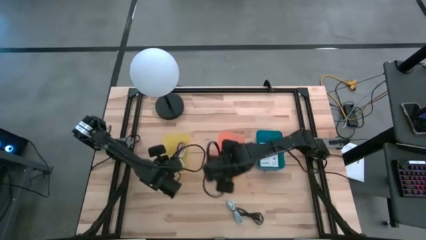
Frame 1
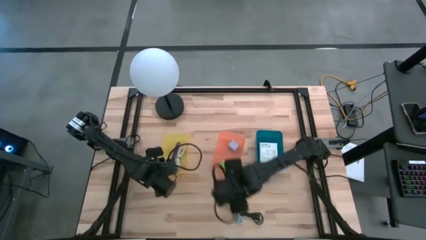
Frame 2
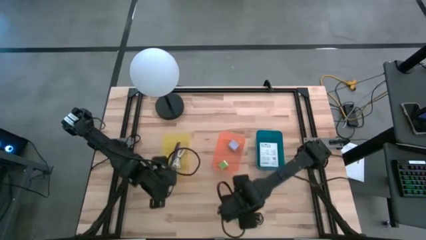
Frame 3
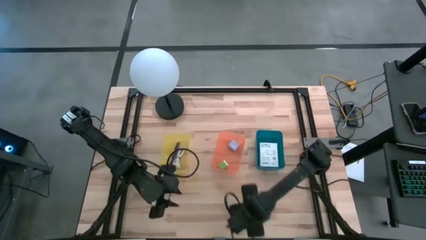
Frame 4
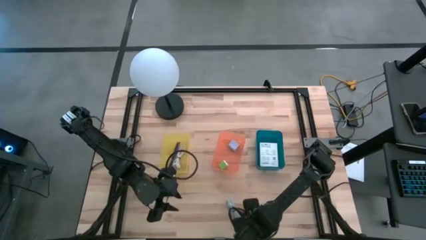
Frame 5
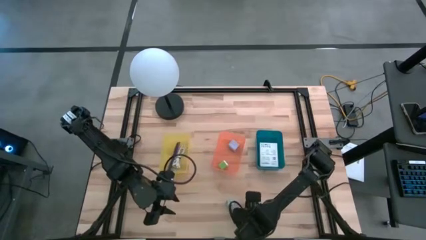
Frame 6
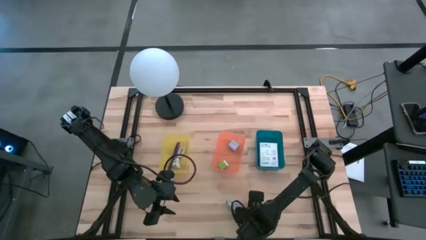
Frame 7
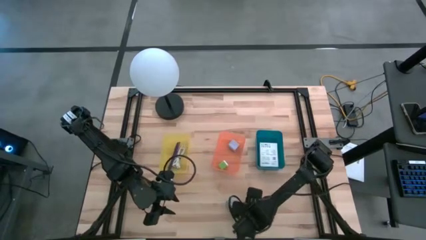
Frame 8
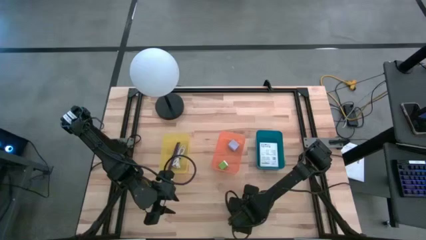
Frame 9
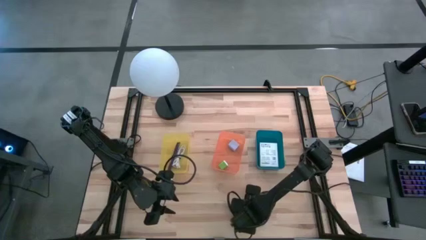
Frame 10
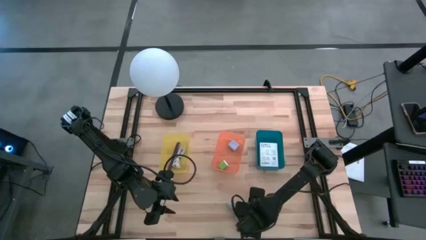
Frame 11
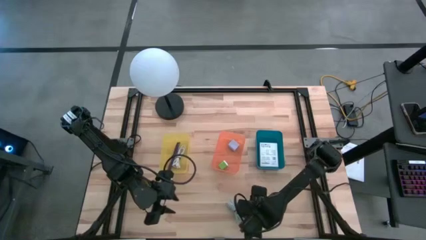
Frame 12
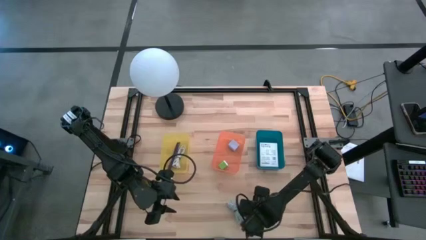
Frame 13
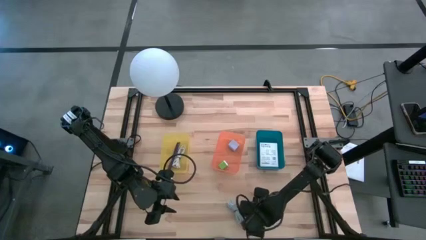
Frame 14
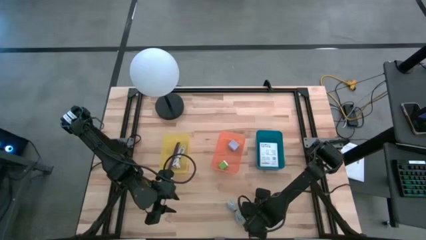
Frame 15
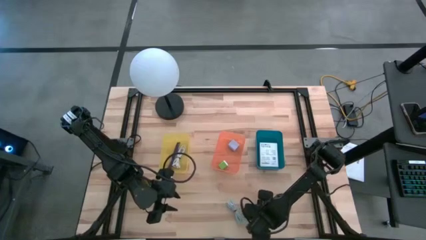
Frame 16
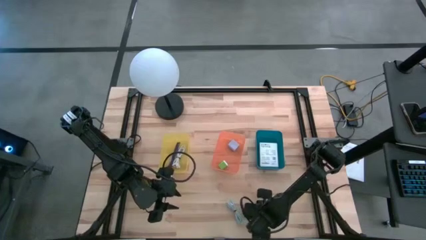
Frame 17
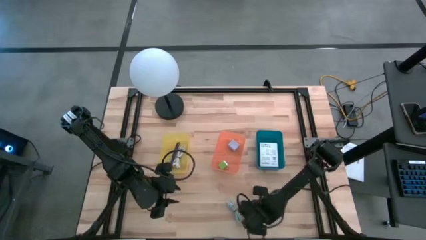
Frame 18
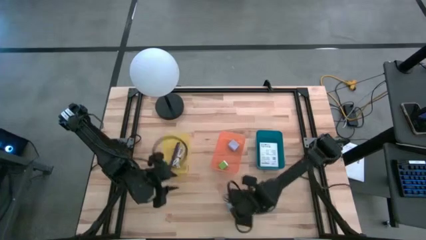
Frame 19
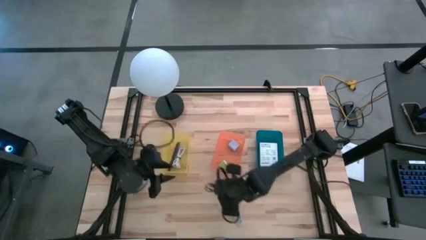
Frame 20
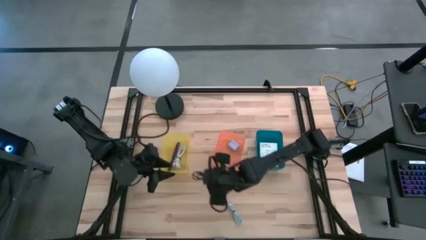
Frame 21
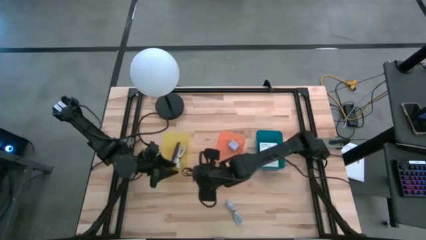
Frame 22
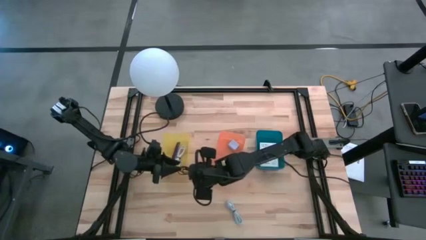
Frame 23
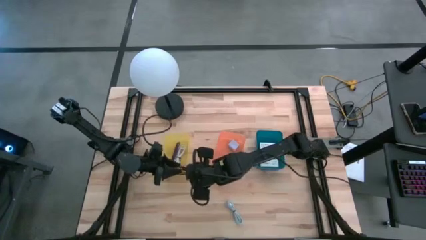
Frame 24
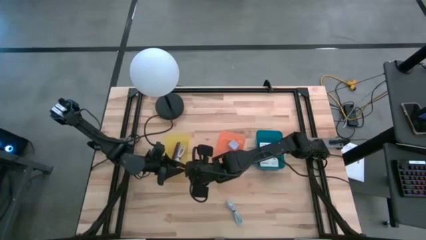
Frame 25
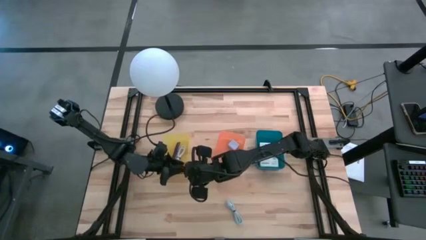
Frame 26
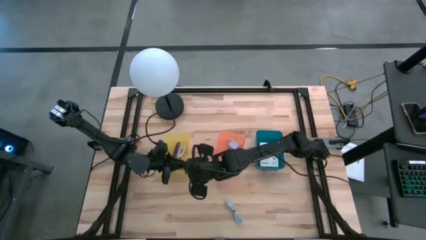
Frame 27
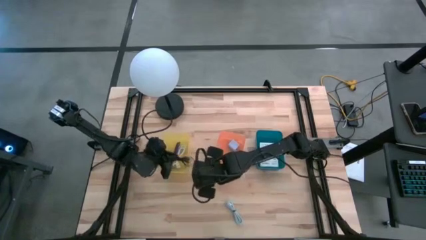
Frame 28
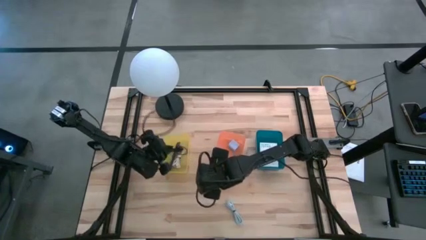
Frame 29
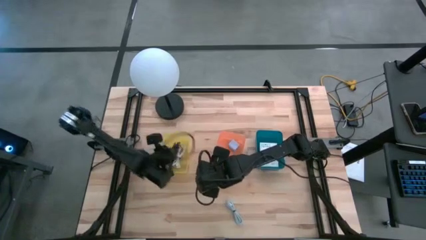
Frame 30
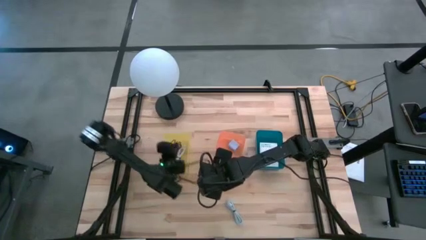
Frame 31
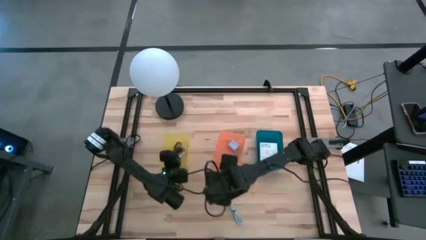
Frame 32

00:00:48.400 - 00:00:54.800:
Task: Pick and place items into bin
Put the black charger cable into the yellow bin

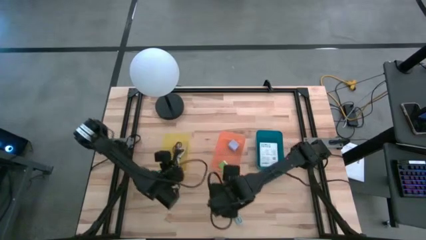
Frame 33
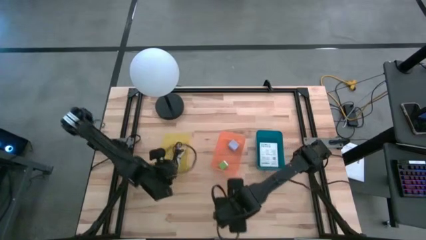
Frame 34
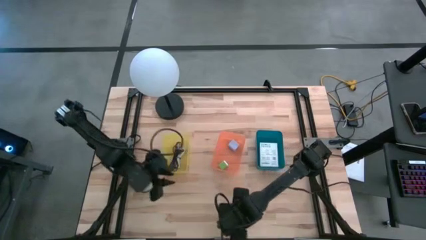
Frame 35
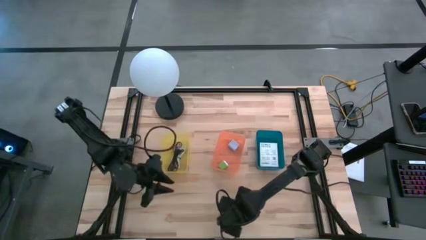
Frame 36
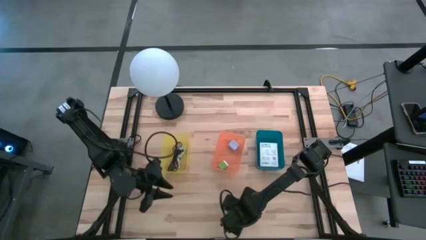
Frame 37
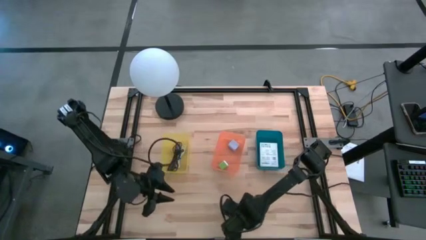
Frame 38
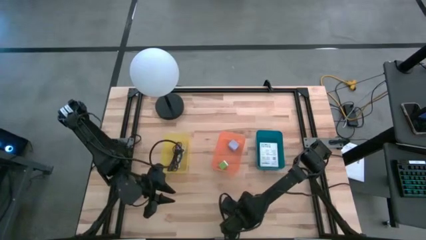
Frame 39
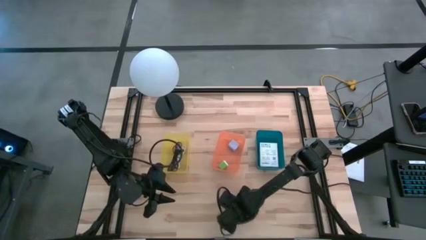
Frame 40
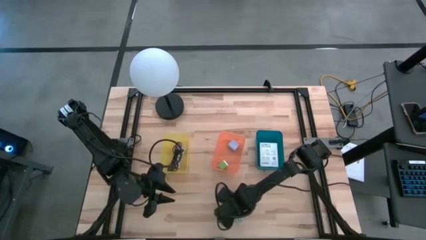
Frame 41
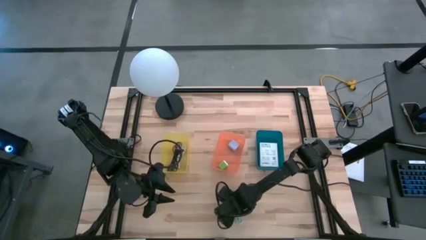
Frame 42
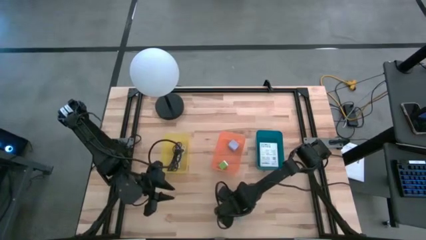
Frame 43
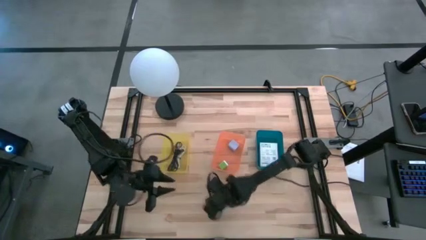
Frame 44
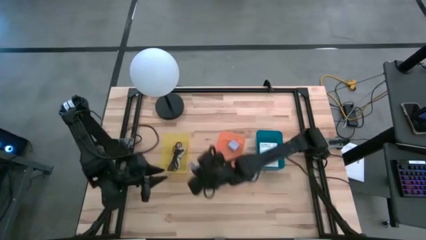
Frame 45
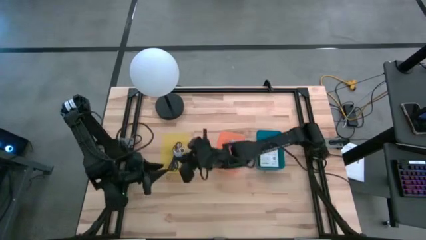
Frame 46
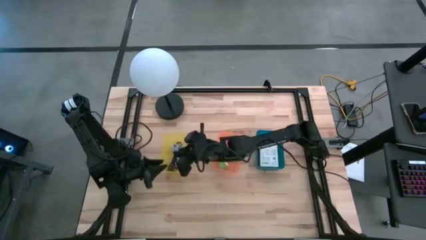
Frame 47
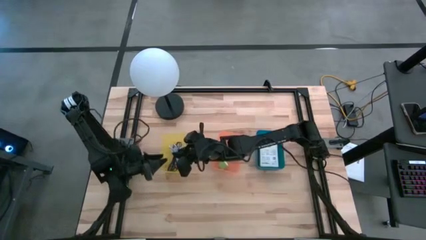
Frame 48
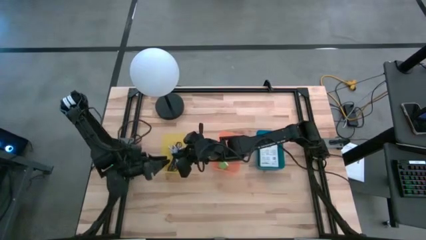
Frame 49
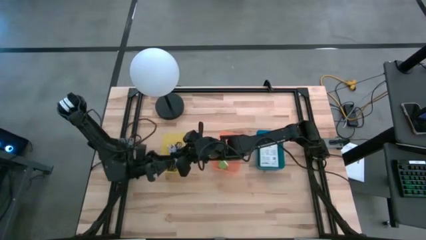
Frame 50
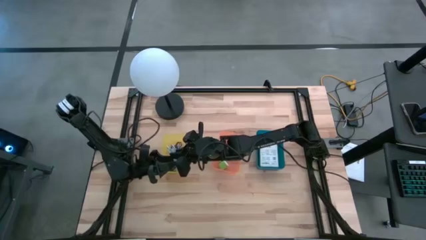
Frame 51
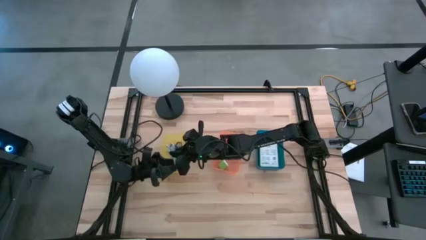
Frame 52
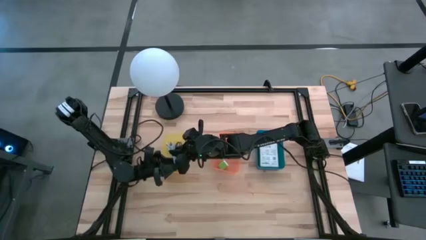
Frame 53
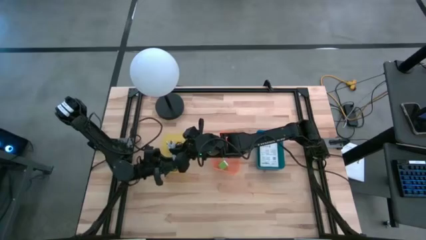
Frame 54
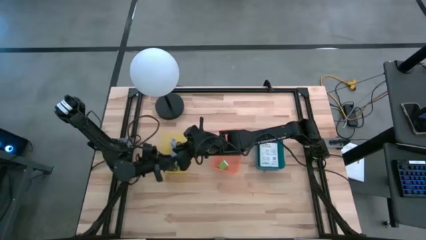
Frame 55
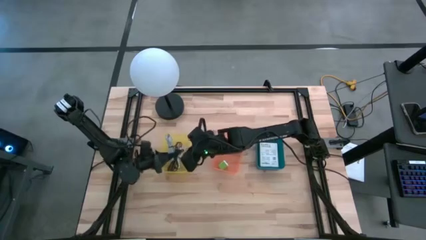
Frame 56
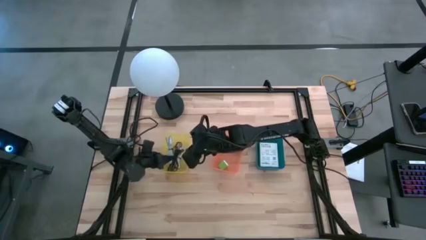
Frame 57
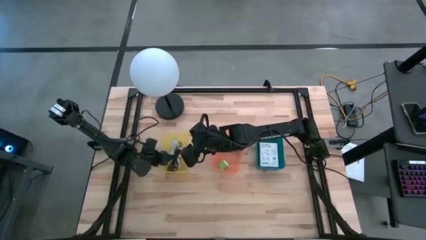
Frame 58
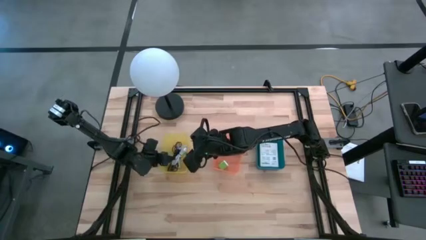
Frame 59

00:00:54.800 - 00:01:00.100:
Put the blue charger cable into the yellow bin

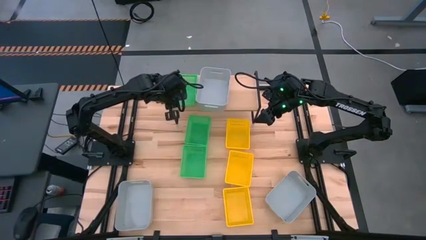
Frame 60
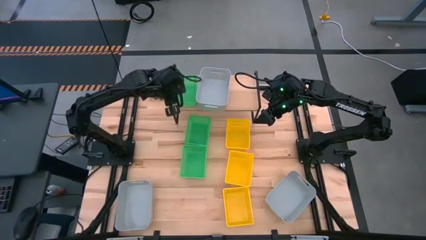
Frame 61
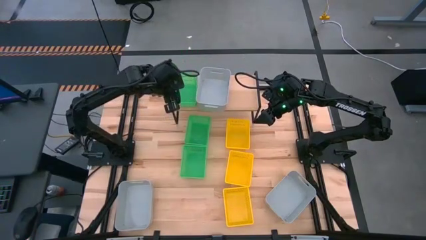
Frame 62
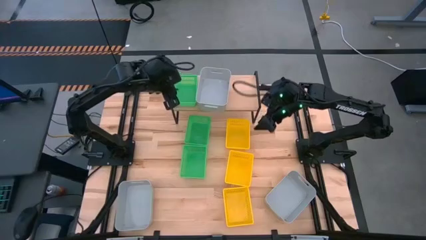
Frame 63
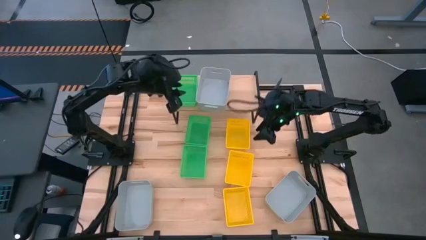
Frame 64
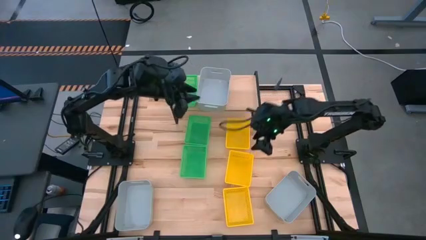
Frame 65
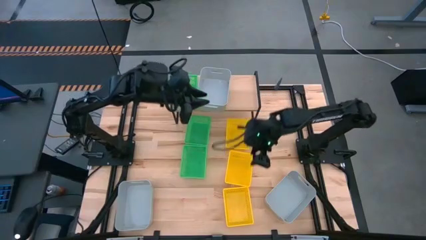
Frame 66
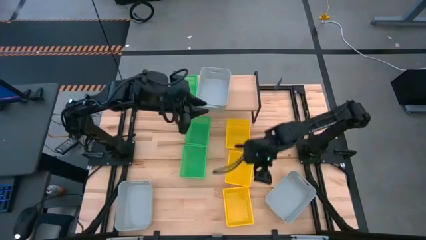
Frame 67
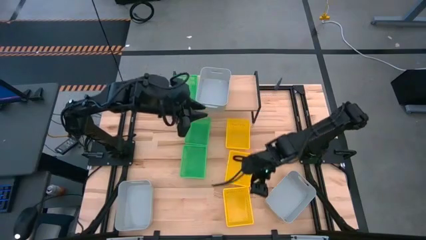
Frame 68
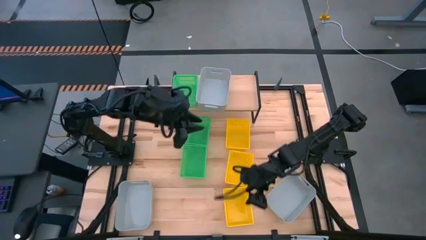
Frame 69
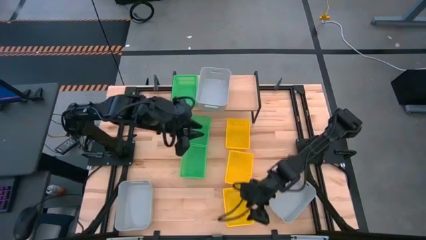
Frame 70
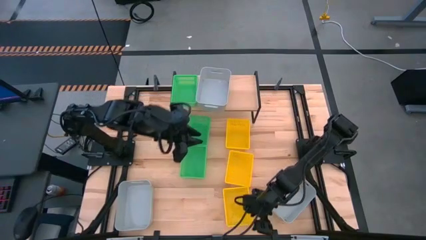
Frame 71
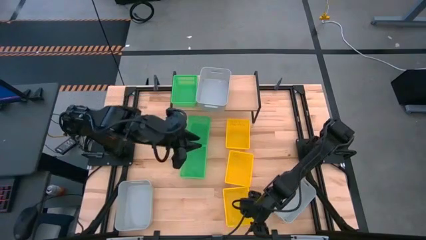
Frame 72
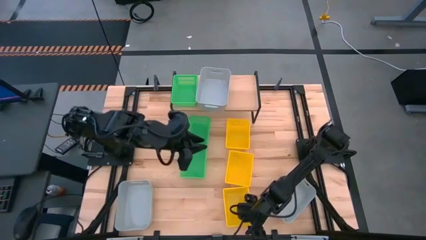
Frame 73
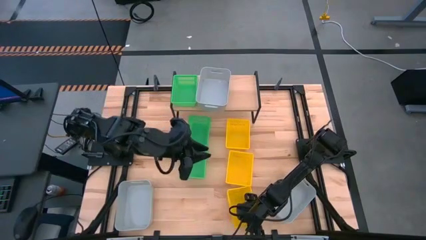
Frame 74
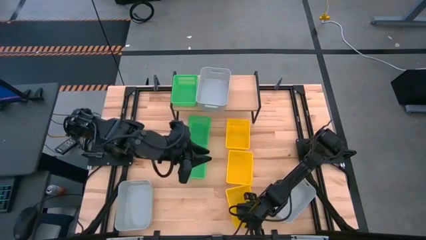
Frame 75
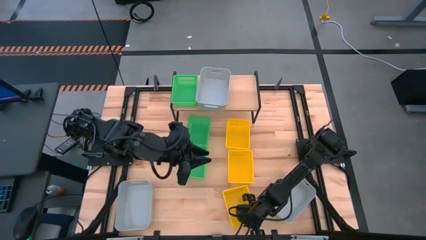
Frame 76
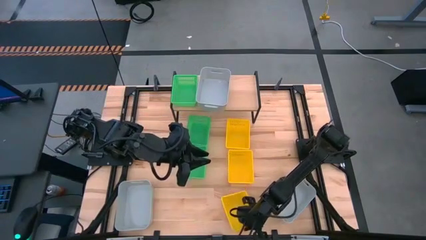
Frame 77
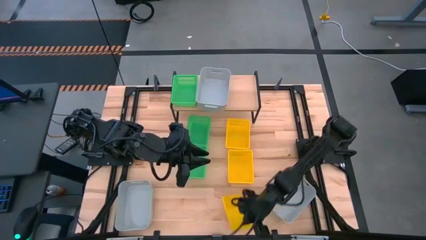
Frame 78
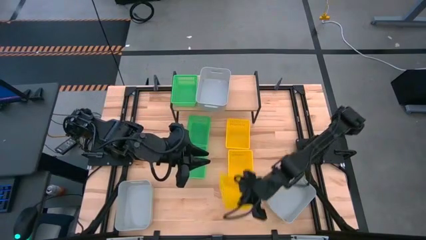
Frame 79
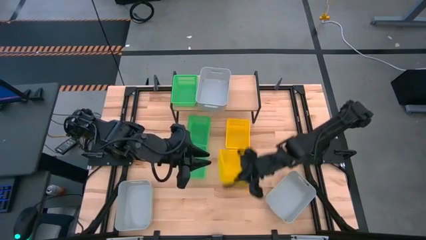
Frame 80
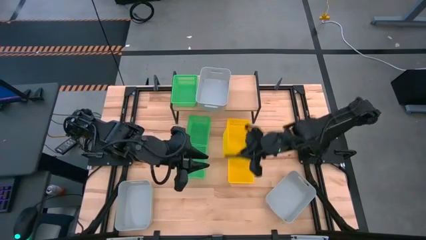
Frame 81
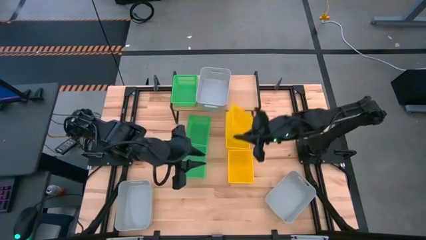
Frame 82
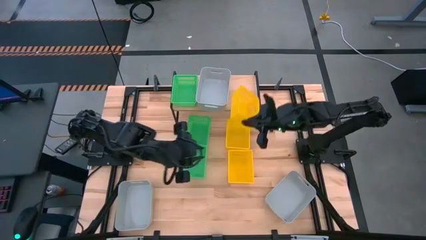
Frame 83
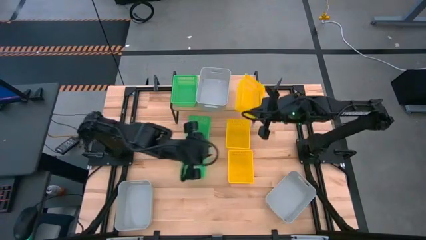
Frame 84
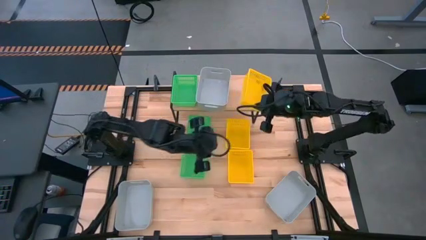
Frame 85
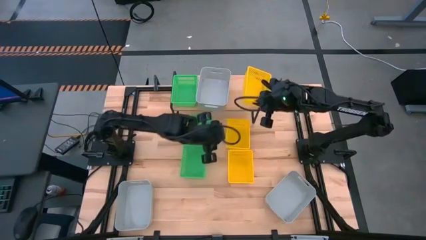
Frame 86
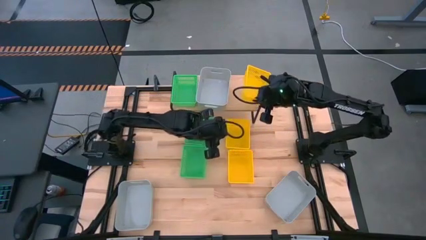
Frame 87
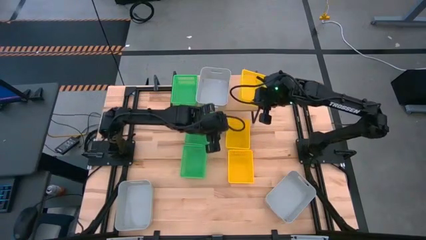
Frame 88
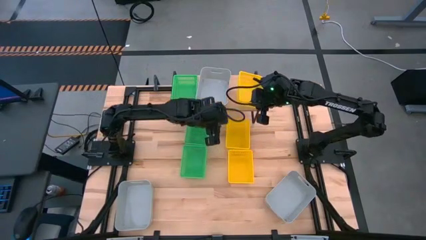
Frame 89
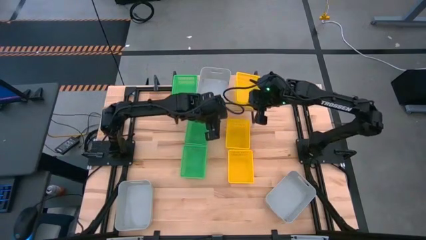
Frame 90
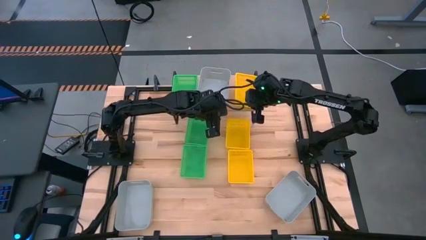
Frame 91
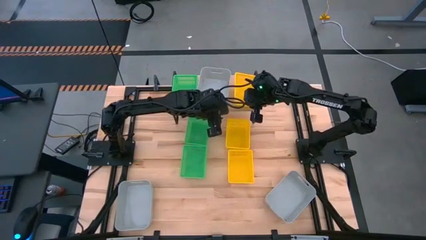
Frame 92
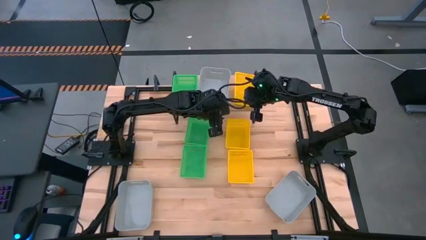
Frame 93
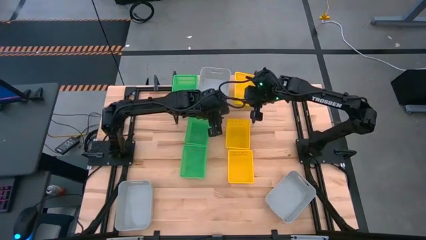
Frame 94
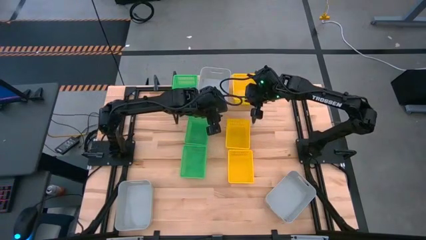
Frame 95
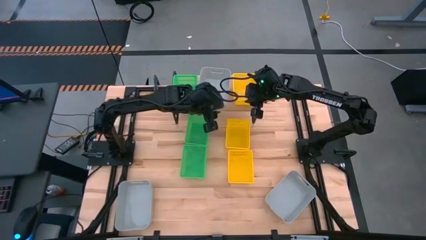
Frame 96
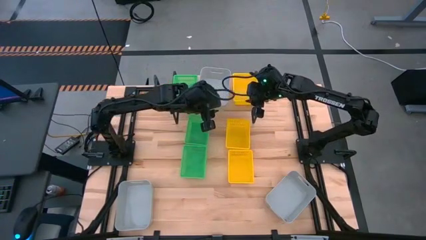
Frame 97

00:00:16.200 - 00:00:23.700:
Task: Stack baskets on shelf by color
Put the bottom yellow bin on the shelf
